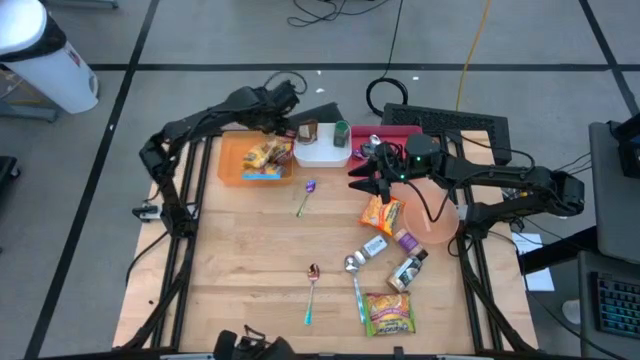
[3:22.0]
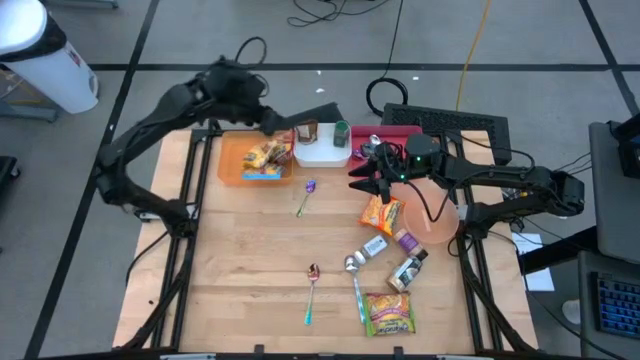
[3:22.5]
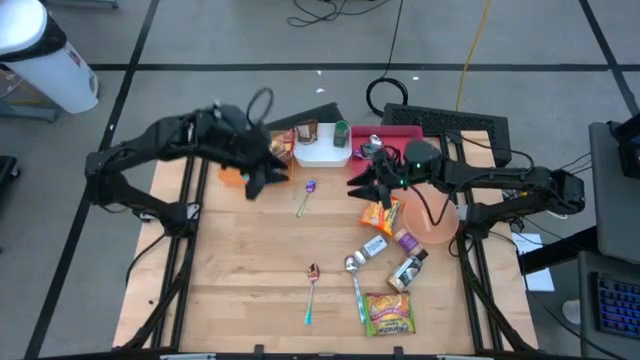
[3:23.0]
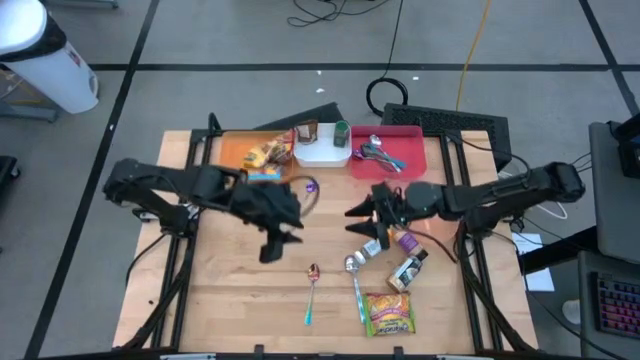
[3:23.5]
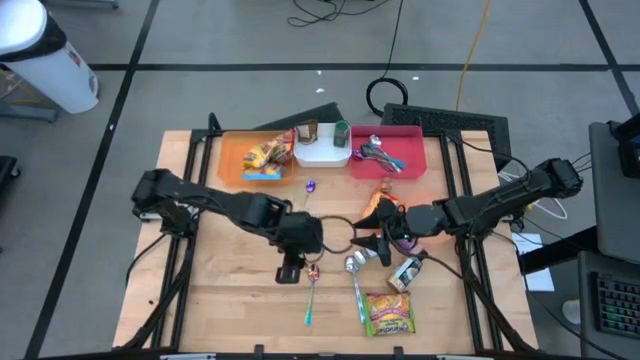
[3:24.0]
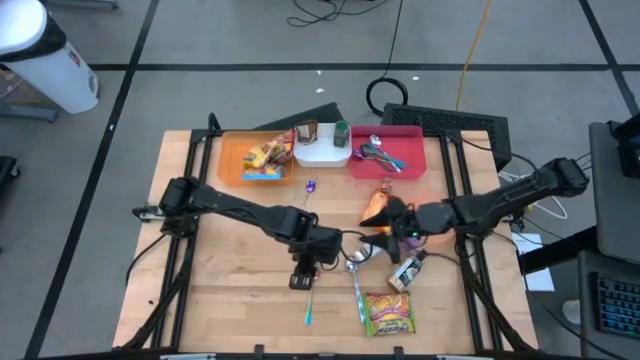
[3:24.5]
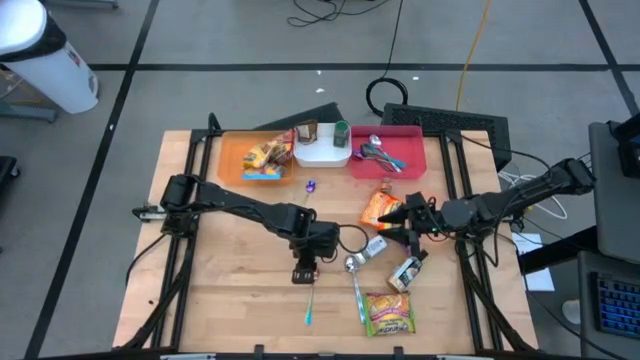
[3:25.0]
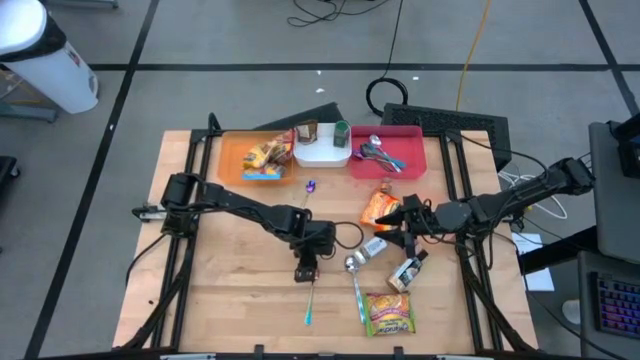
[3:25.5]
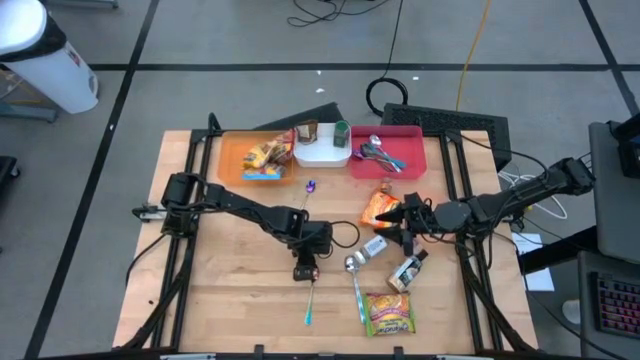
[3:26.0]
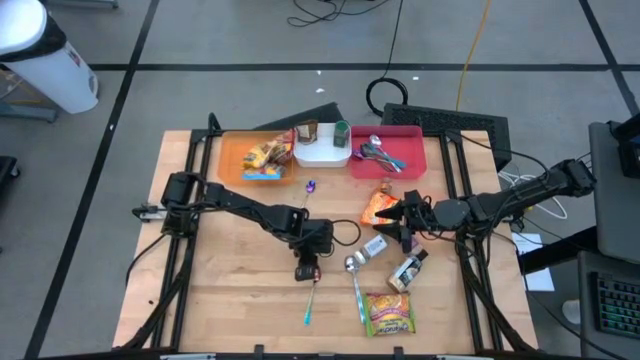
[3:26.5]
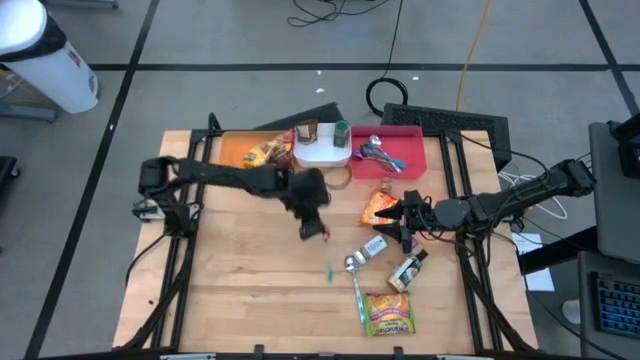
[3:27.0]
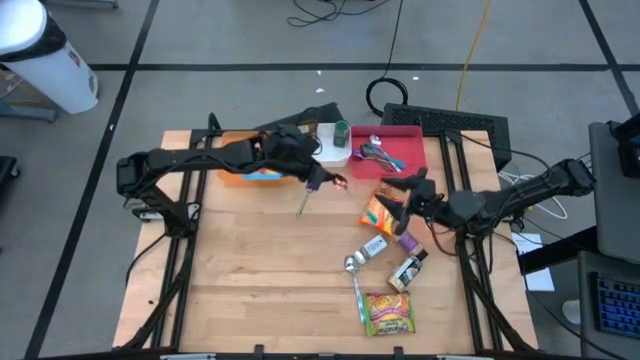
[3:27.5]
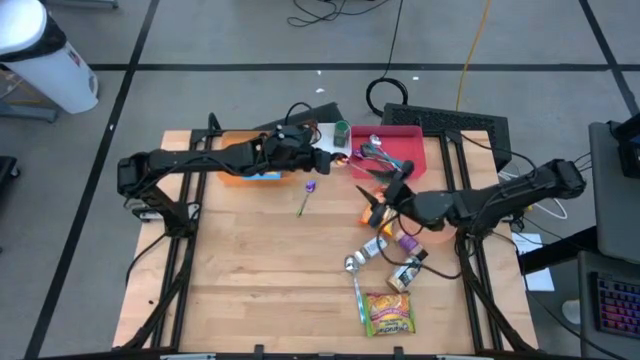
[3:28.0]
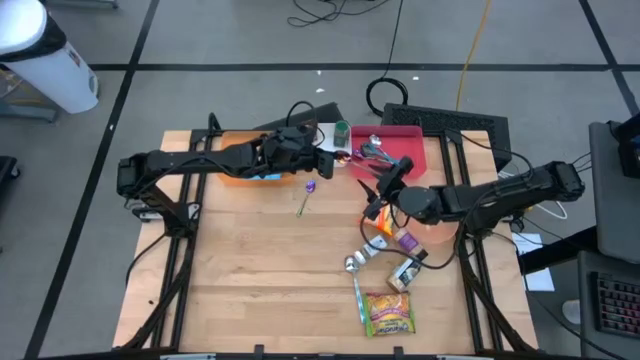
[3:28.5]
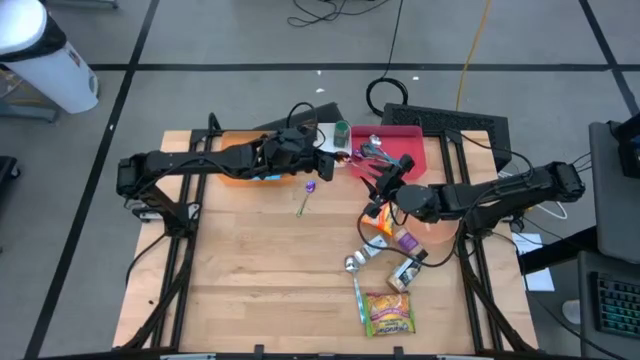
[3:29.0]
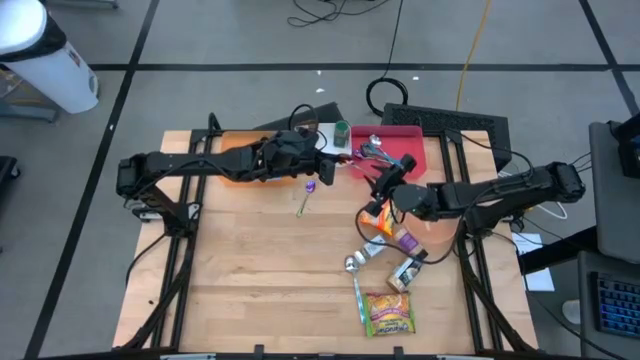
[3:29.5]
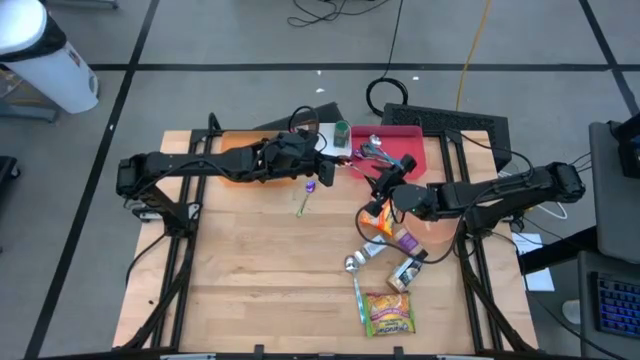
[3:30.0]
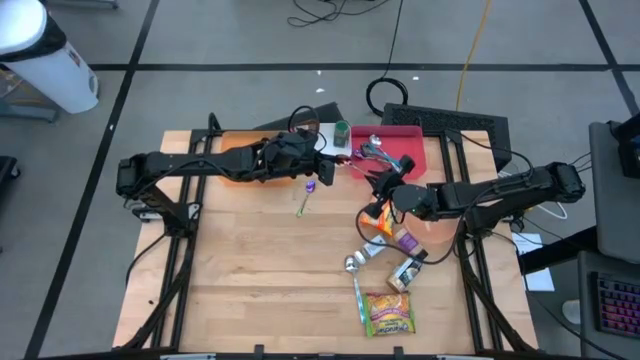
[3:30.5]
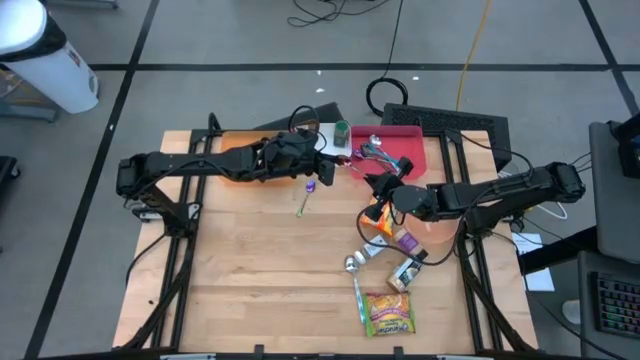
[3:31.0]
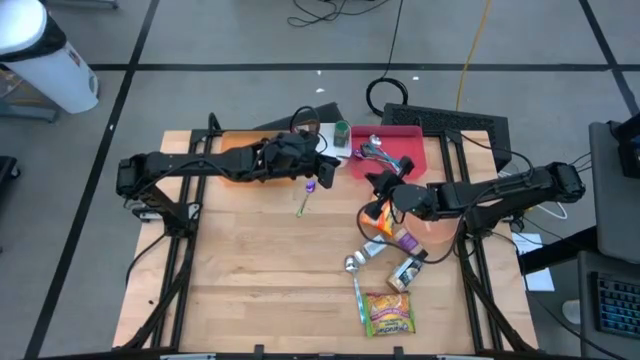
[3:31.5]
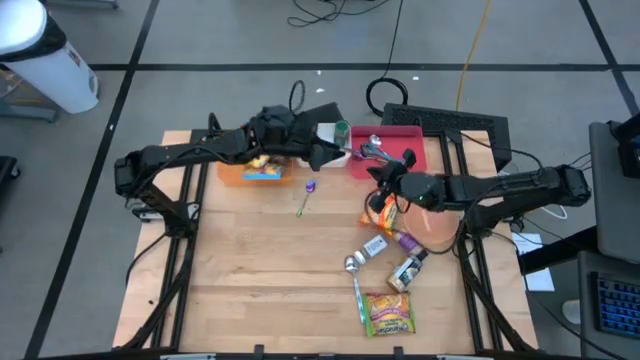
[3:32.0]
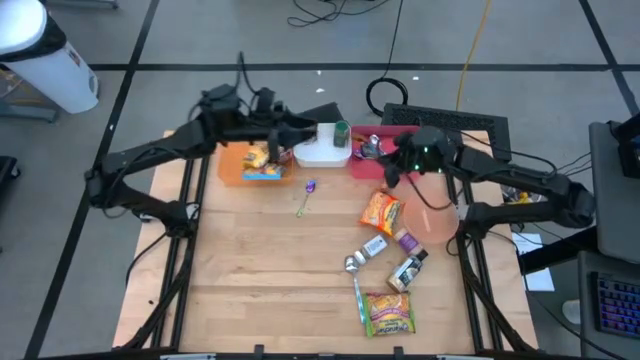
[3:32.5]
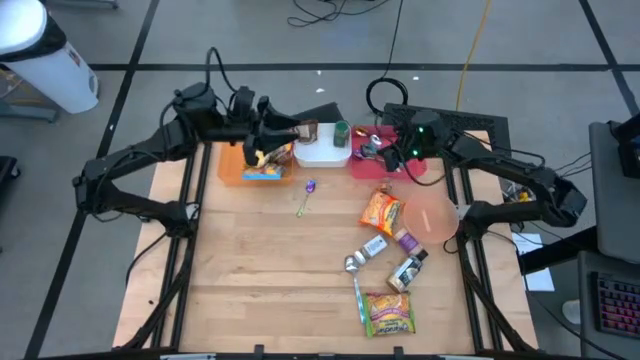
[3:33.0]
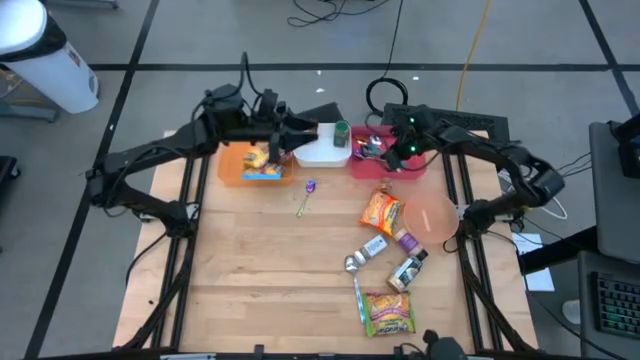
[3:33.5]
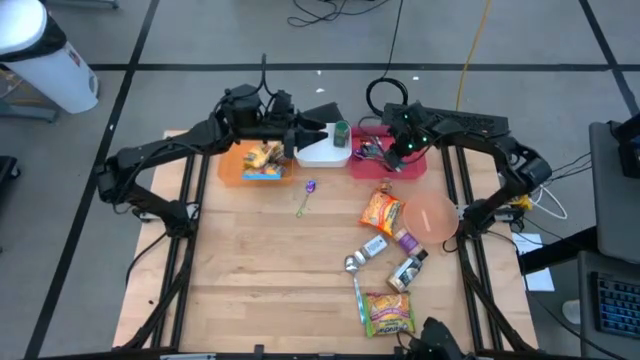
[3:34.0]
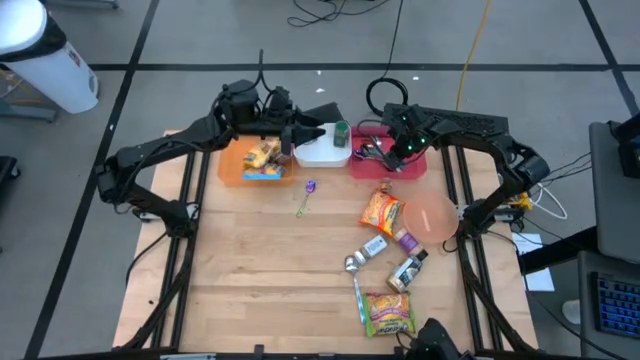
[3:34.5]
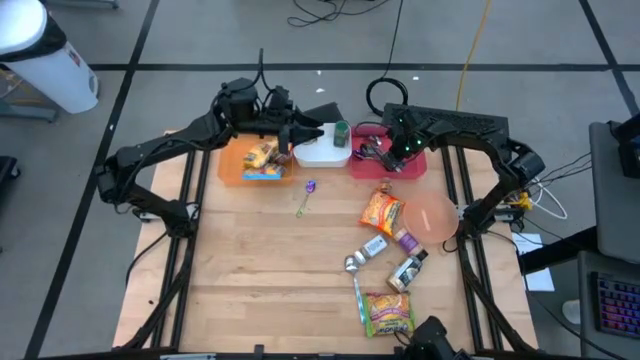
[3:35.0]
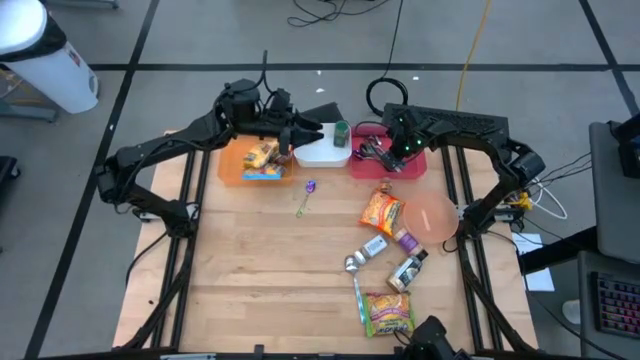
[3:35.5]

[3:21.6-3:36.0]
Task: Pick & Place Food Item
Put the violet spoon into the red bin

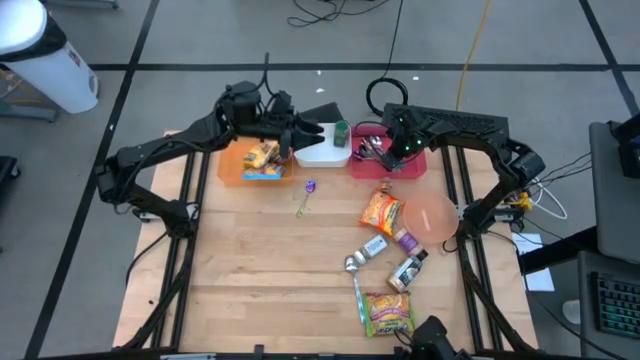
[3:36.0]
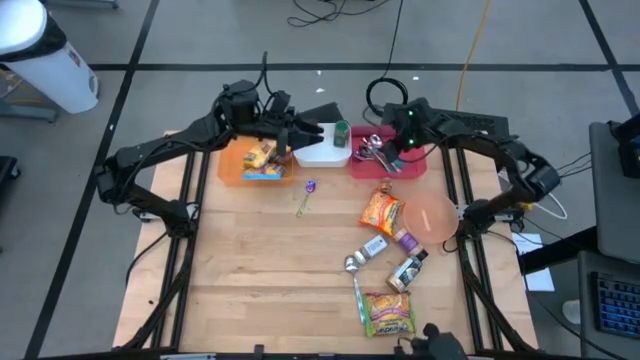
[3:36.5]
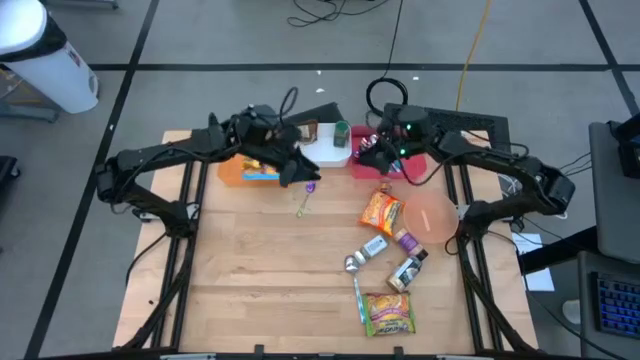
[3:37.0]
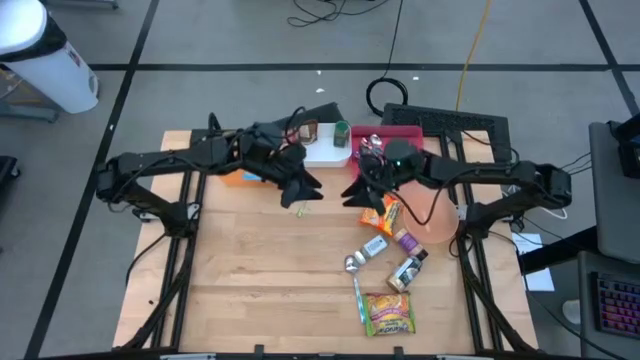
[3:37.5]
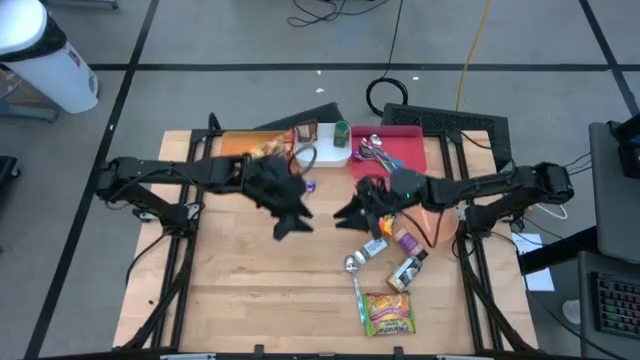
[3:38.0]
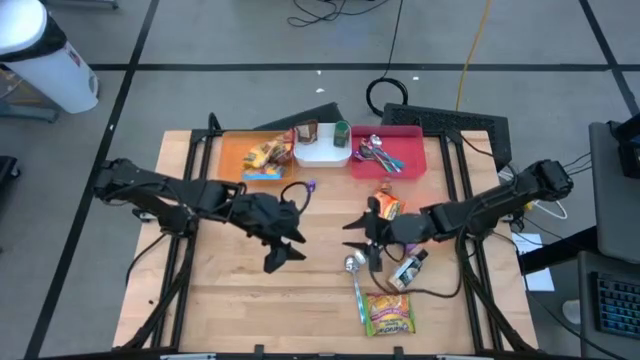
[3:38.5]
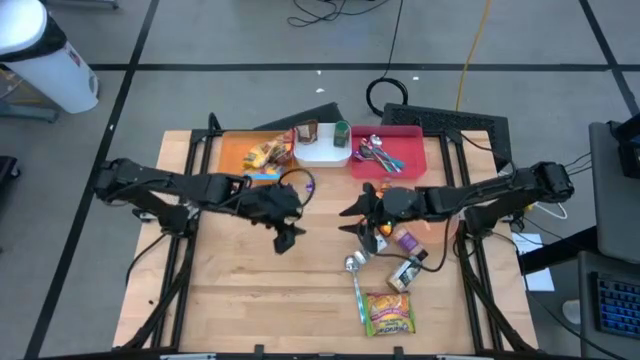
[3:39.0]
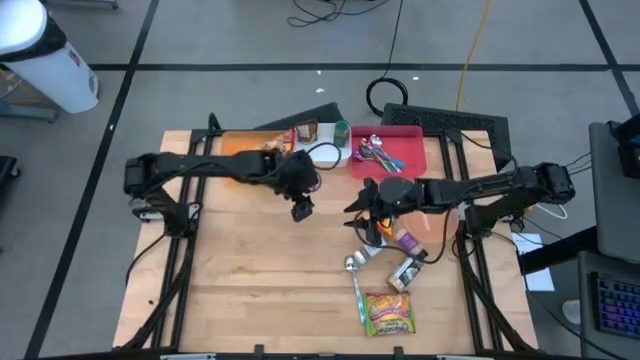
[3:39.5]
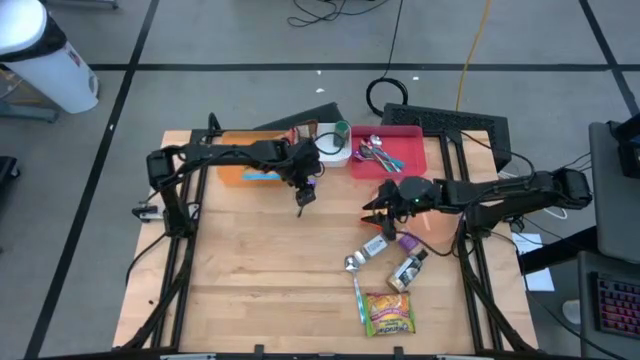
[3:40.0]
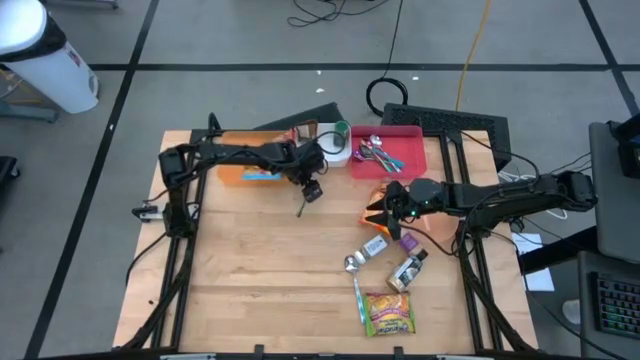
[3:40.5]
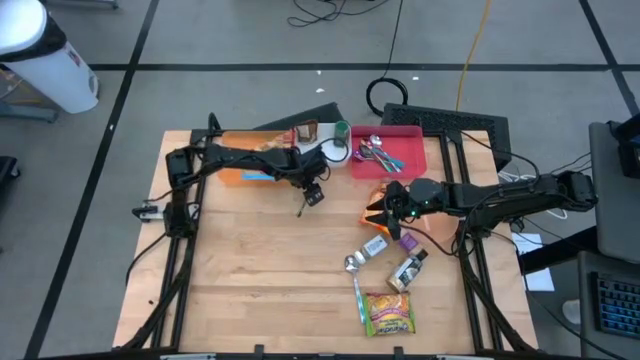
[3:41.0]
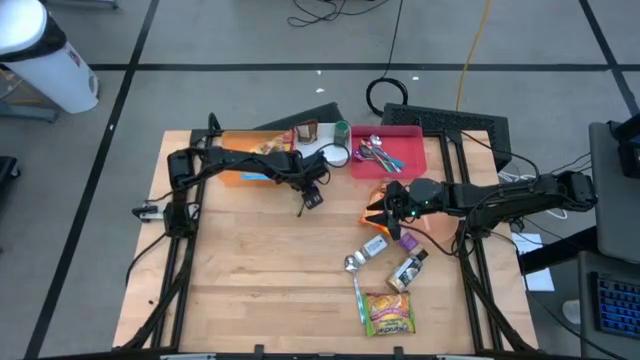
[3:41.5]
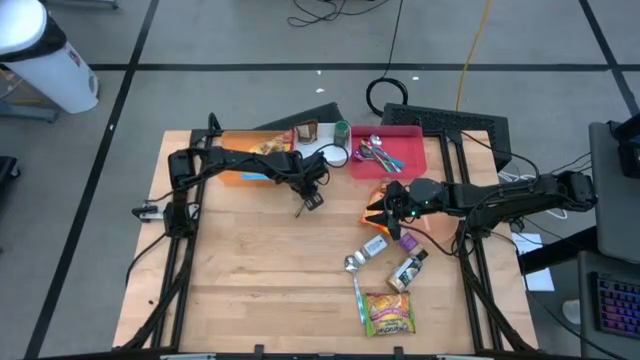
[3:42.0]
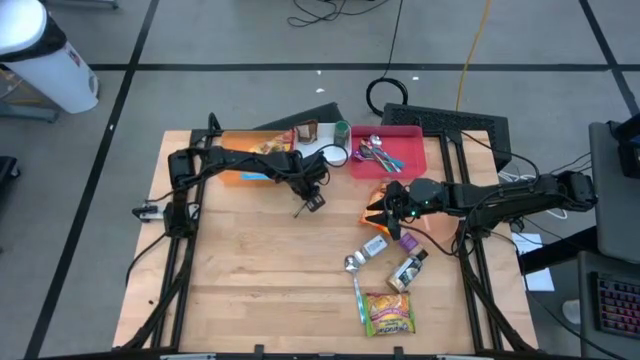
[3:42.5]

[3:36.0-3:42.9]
Put the violet color spoon into the red bin
